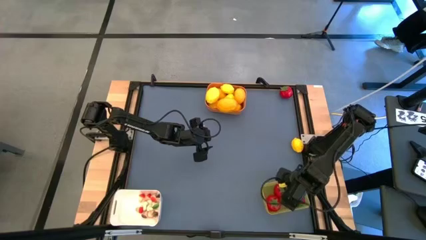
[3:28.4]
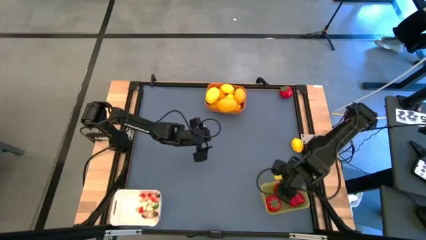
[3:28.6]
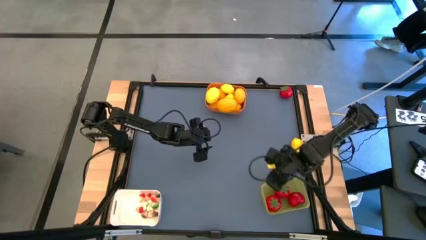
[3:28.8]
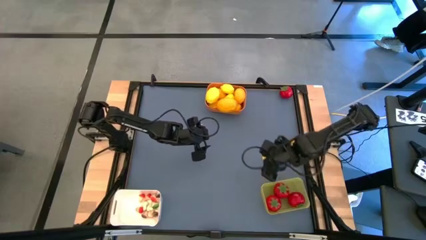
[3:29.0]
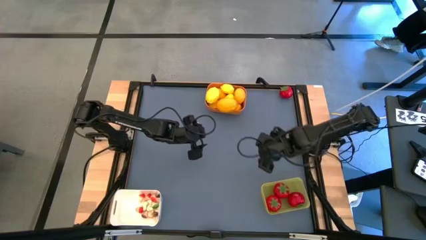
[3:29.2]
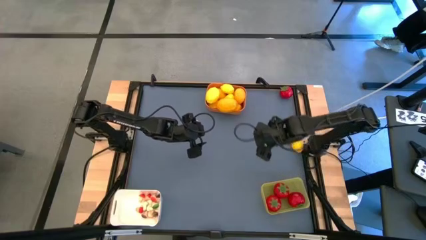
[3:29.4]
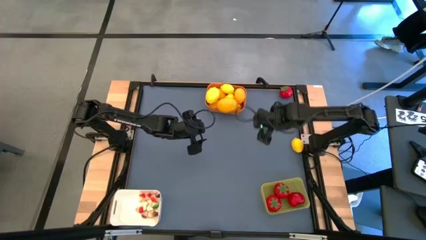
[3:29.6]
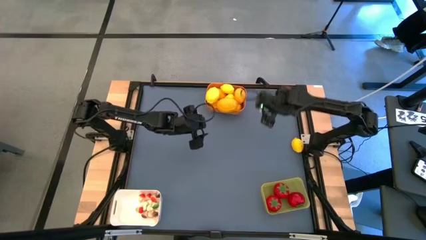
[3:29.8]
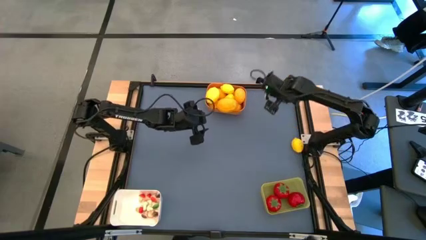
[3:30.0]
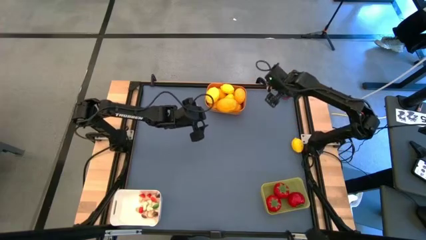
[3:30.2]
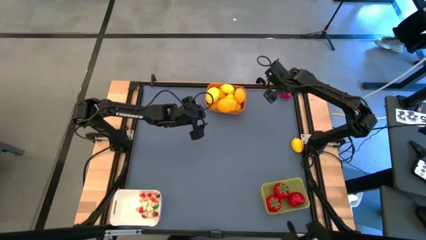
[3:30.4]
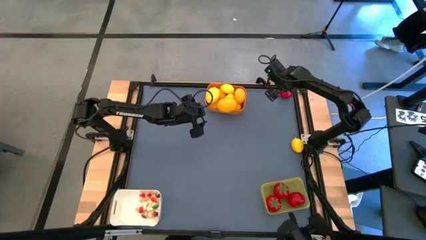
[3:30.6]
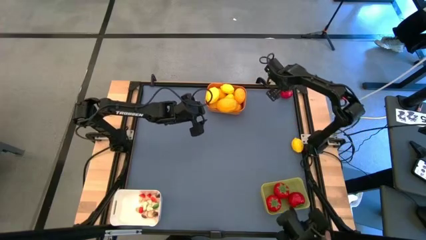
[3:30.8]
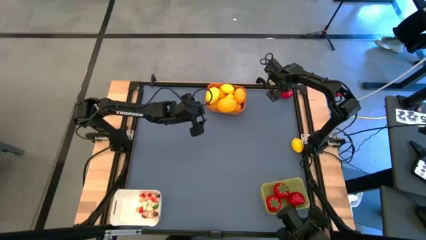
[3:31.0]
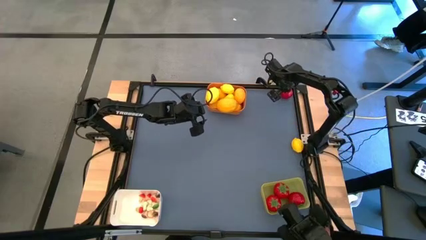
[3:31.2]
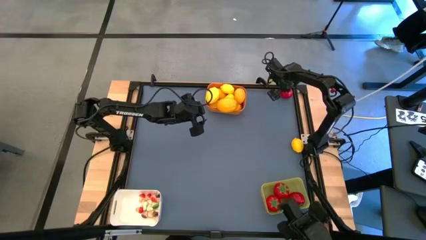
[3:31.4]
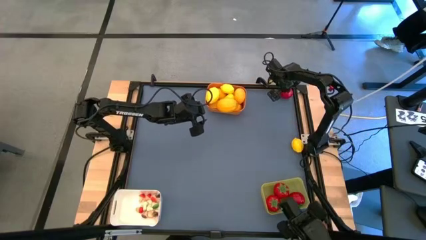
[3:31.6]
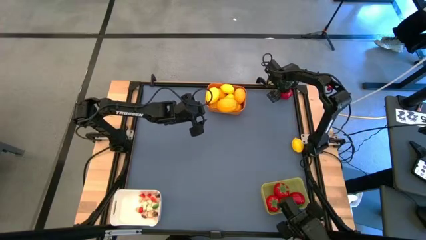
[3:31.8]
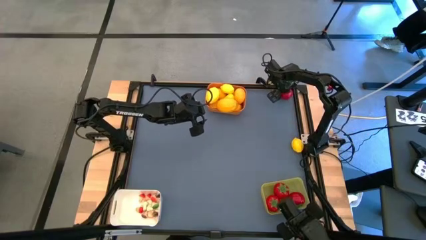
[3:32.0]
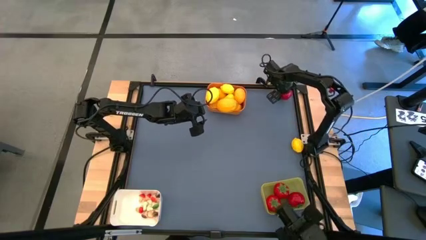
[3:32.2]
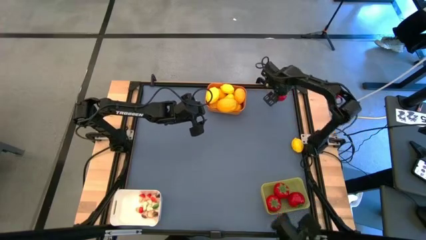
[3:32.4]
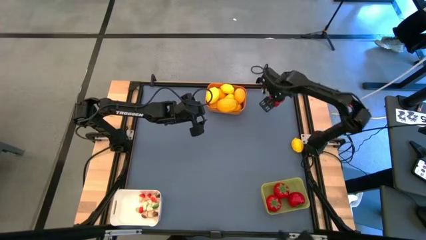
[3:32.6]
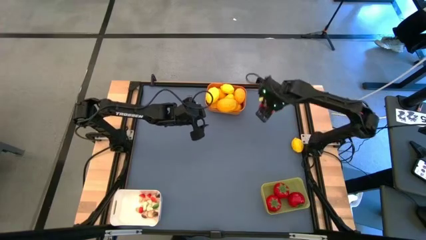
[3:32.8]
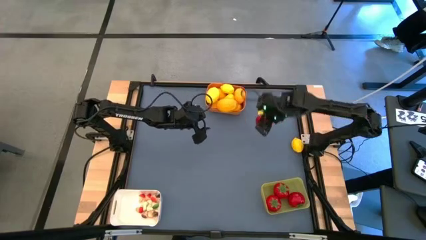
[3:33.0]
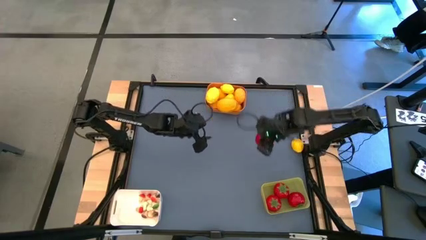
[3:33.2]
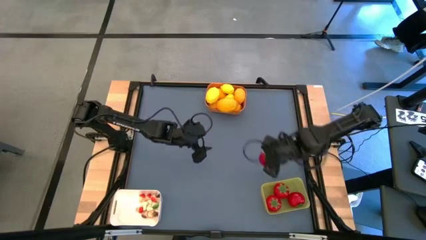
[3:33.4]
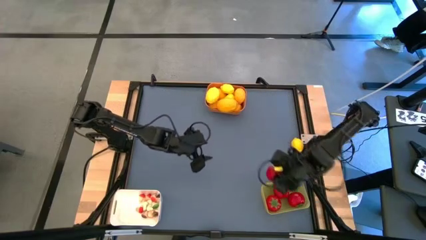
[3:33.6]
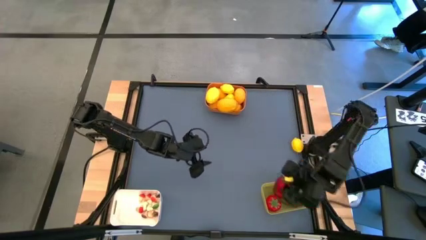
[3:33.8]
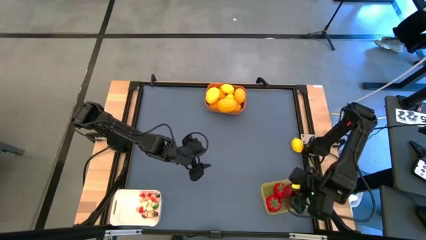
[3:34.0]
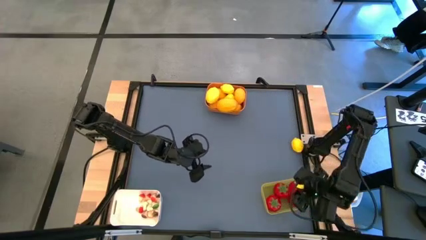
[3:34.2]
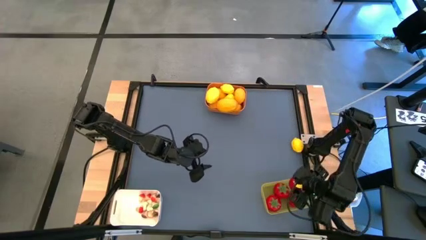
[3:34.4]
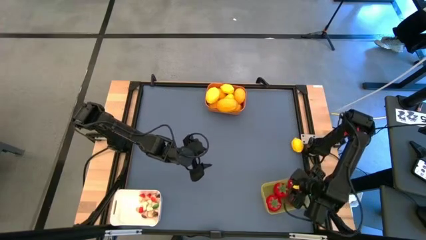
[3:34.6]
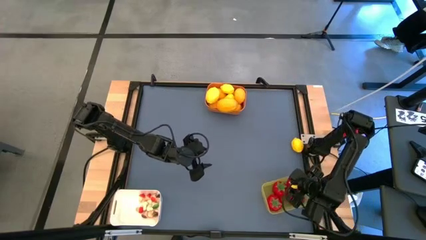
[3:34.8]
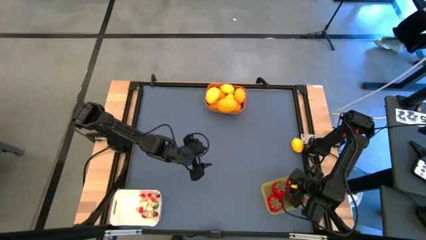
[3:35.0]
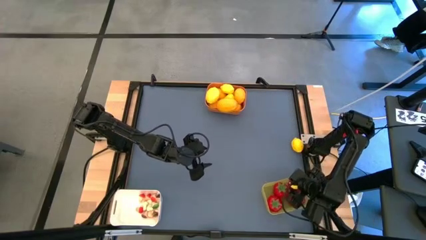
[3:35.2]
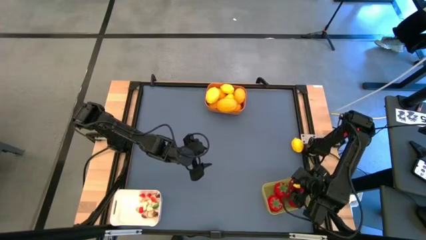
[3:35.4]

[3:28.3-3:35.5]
Task: Sort produce into baskets
Put the red tomato into the yellow bin

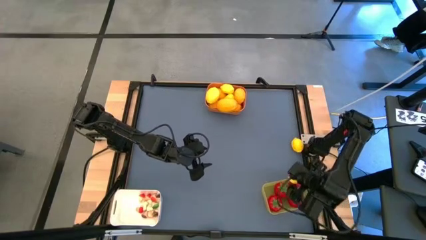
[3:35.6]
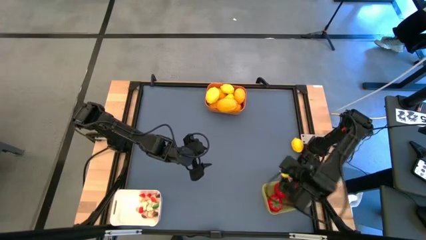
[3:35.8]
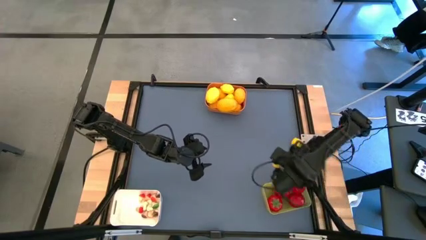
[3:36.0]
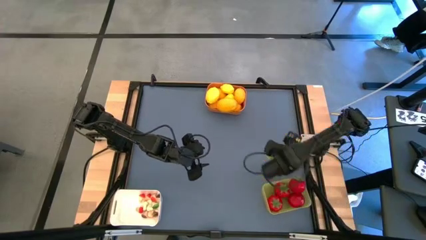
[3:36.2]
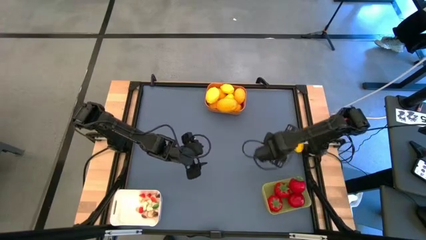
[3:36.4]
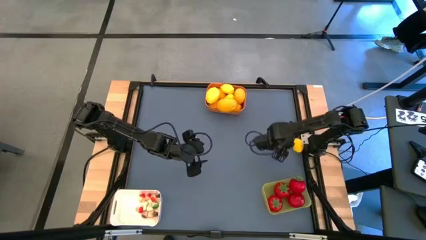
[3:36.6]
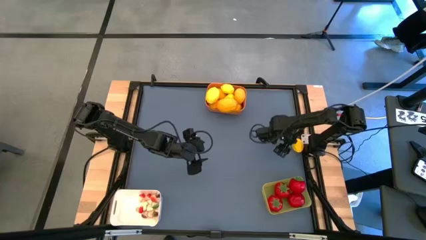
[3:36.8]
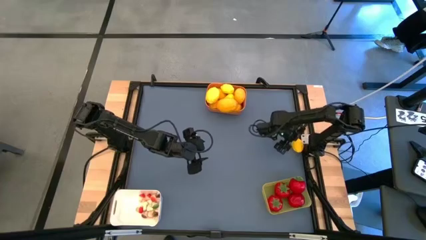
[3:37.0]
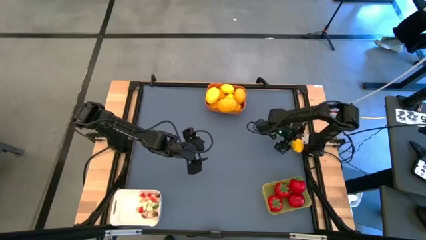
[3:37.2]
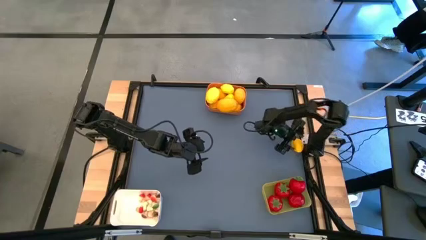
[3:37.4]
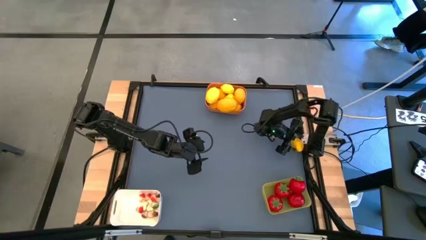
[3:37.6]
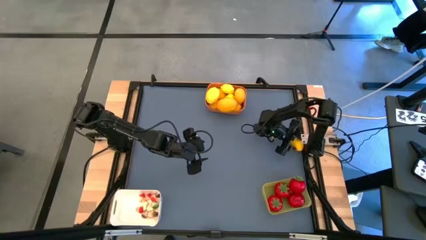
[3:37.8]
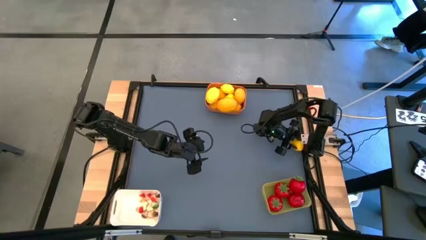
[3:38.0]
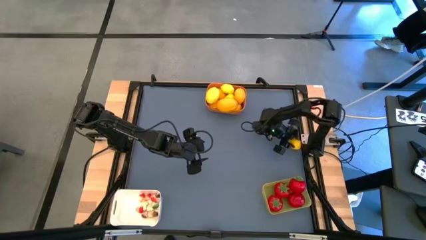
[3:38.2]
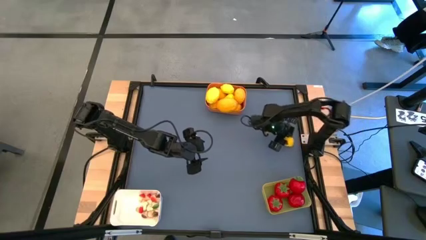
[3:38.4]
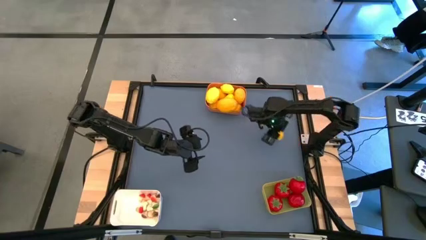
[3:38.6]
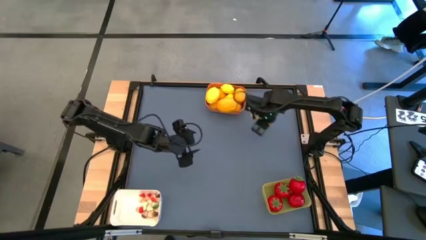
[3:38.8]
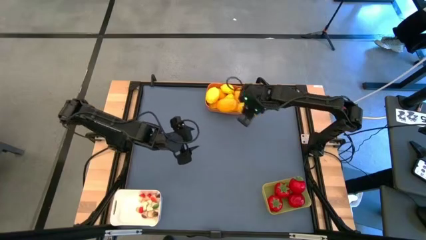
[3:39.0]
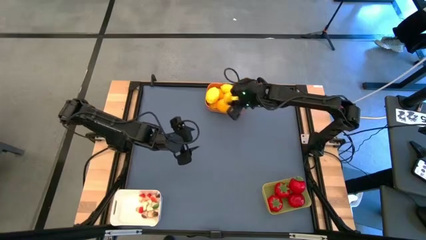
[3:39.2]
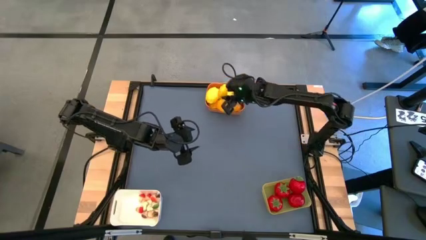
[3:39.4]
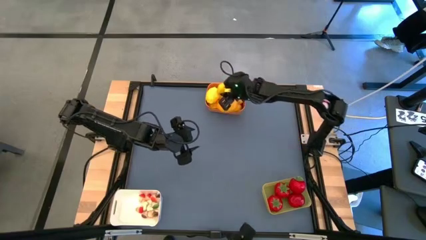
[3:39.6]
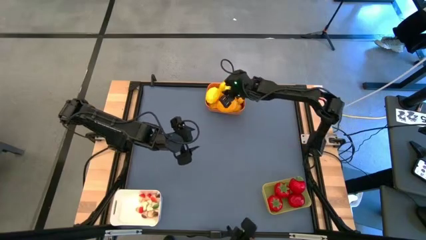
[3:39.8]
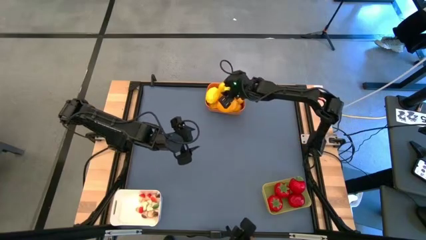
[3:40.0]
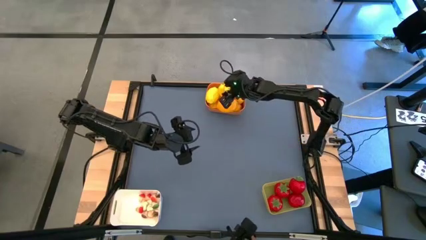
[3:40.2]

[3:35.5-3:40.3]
Put the yellow lemon into the orange bin

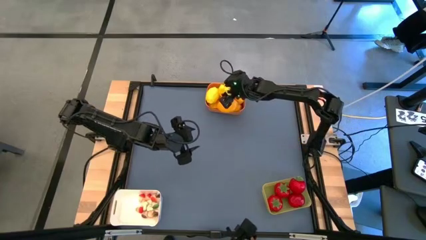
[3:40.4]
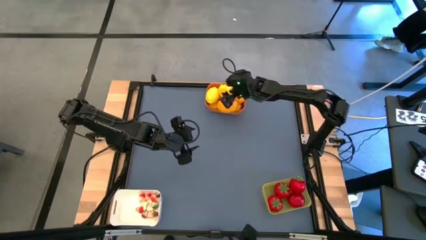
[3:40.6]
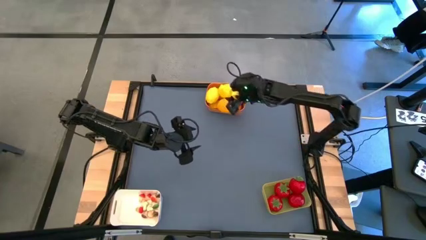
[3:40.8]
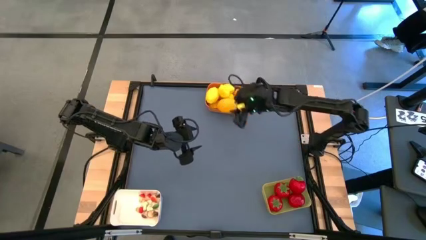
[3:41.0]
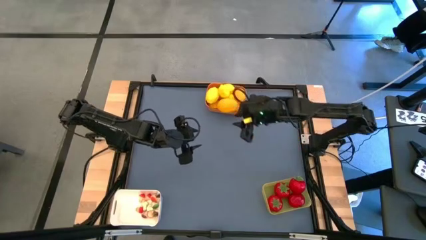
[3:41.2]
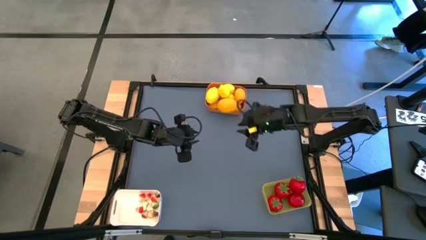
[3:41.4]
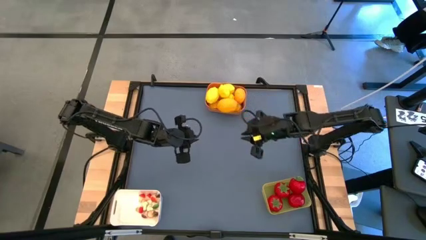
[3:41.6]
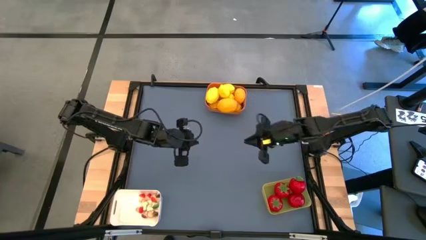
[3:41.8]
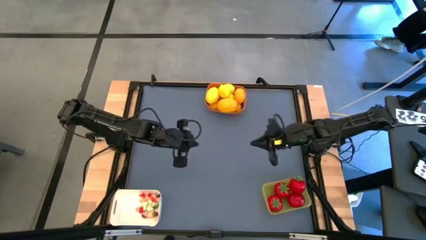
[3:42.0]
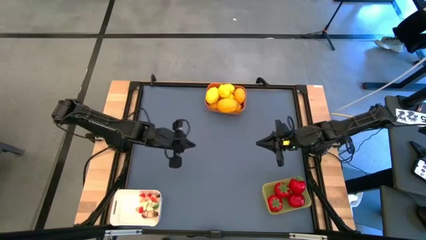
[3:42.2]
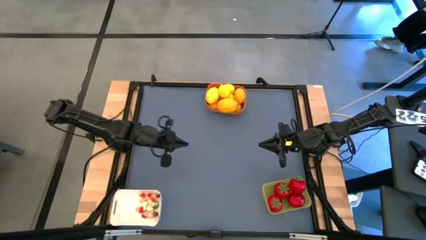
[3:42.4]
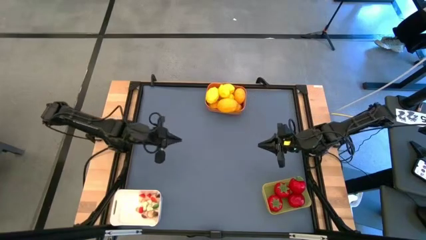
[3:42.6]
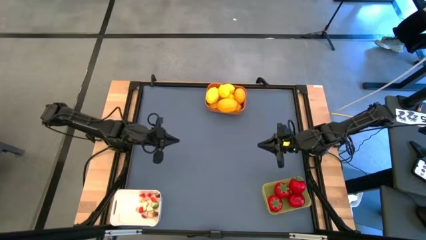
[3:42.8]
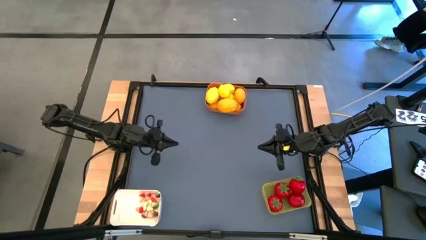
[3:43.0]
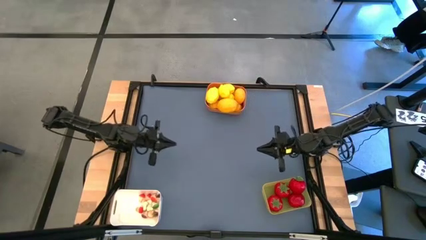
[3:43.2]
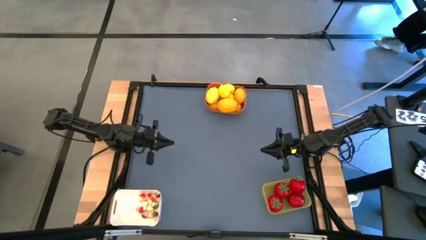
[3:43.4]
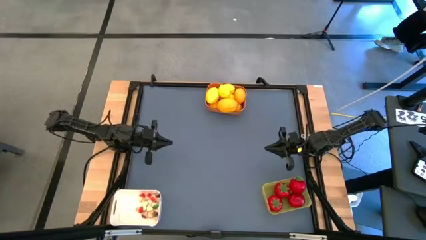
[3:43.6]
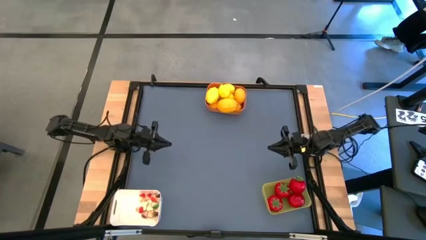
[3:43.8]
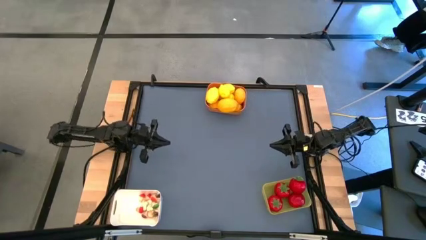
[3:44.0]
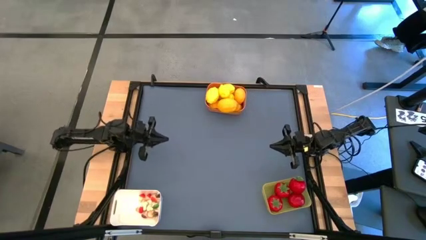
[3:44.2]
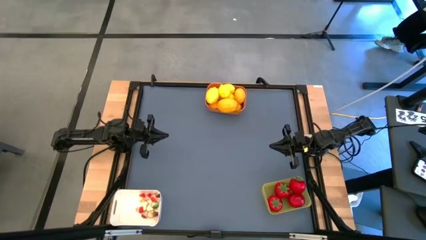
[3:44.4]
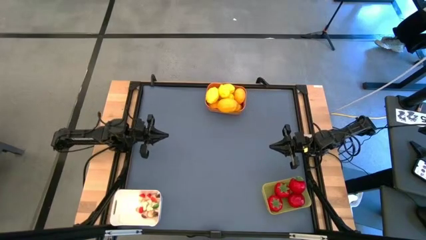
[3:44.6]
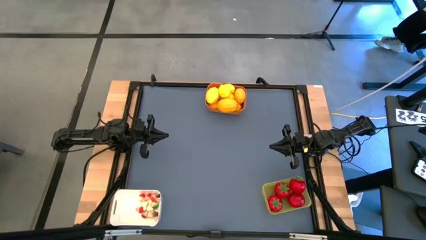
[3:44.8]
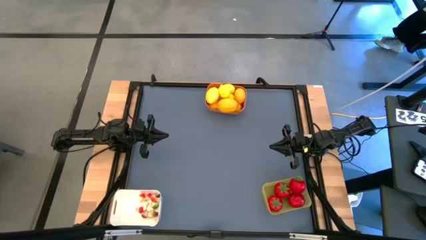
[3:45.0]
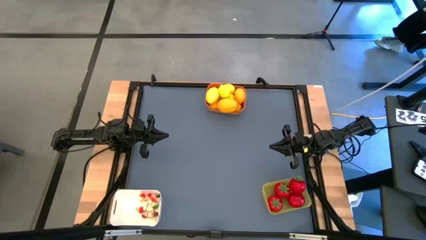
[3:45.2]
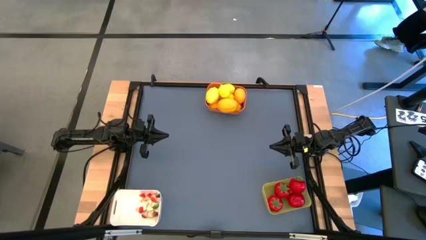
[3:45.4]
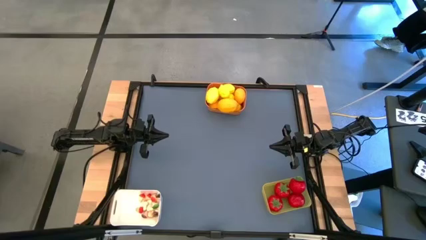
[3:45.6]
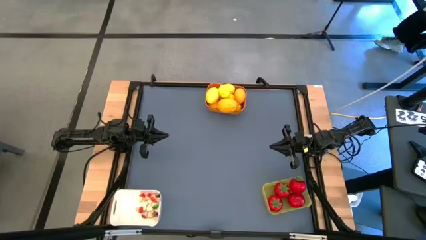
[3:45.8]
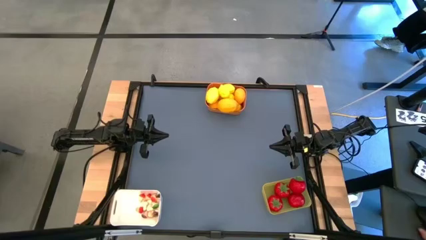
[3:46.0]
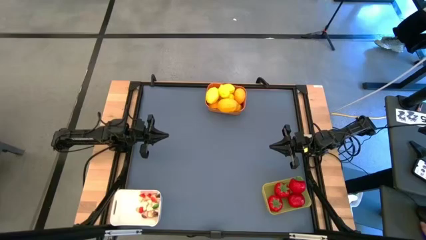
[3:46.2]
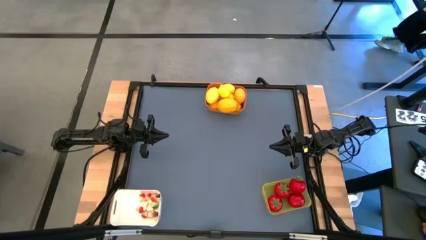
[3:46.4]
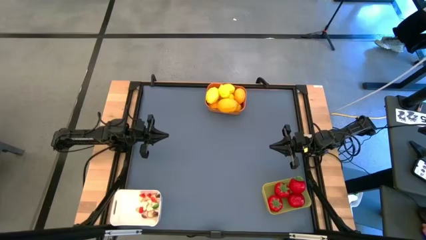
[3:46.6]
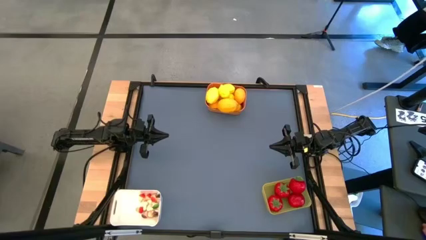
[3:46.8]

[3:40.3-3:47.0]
Return to Home Position
